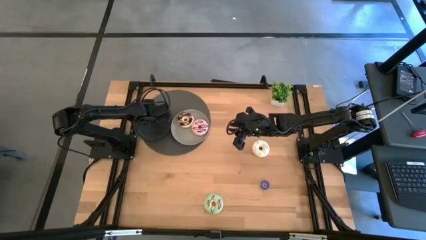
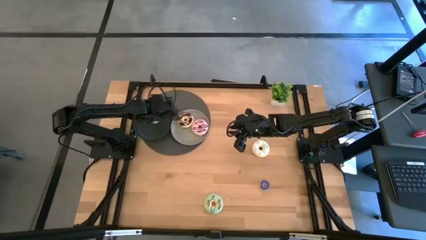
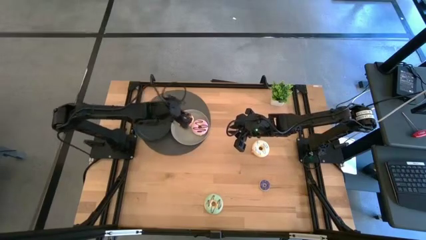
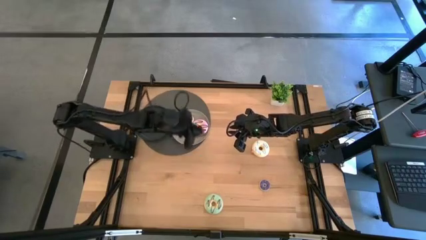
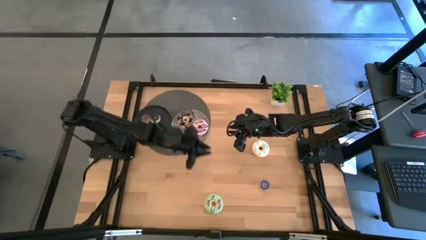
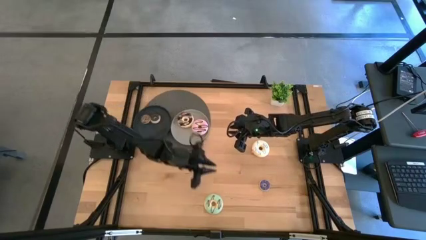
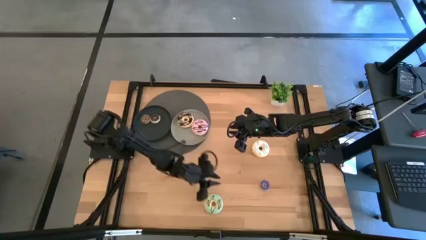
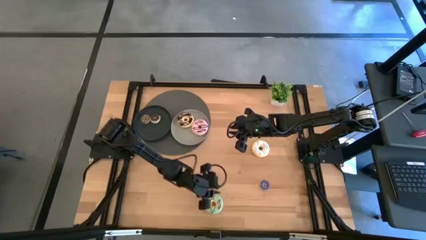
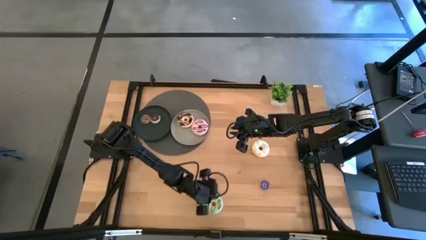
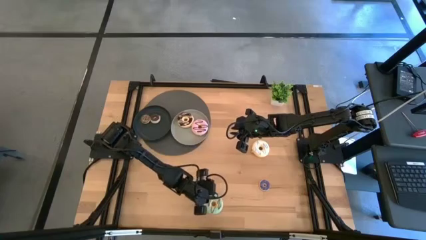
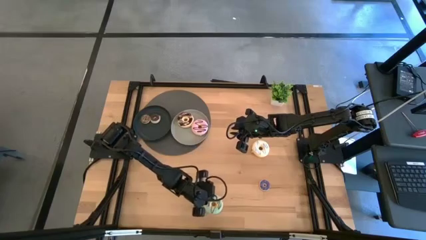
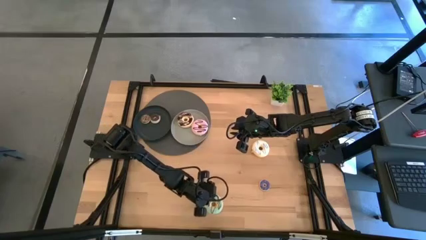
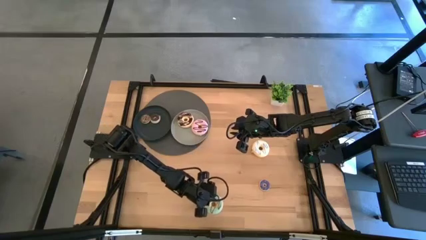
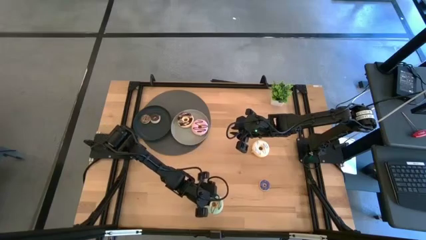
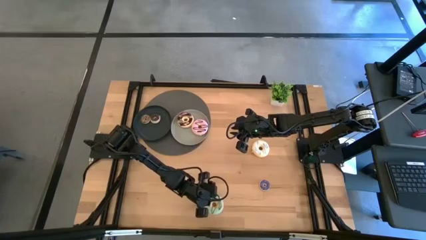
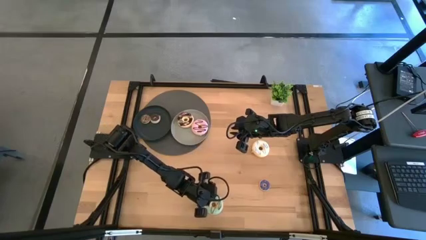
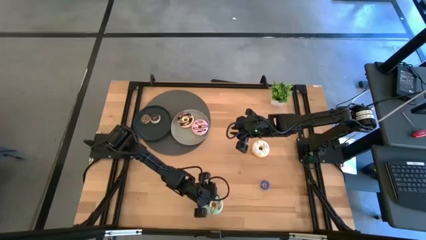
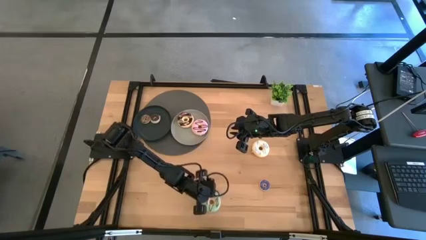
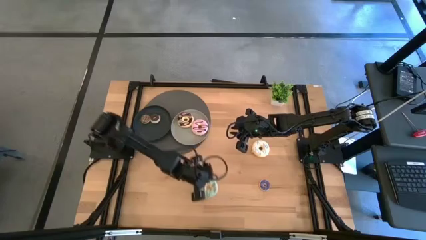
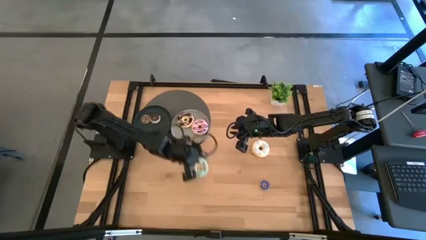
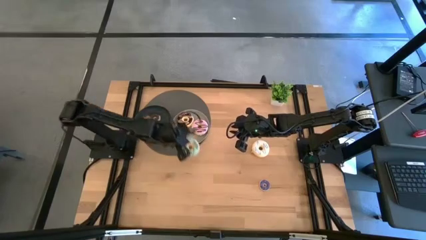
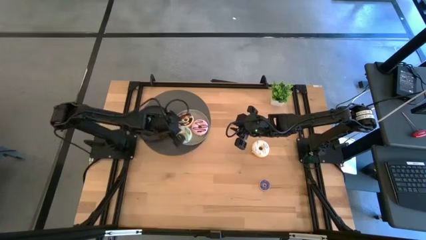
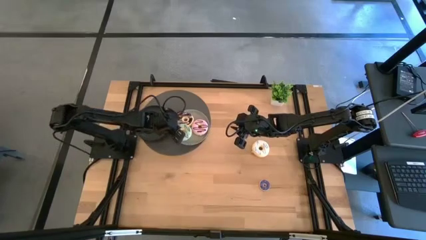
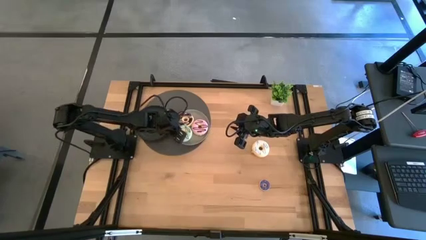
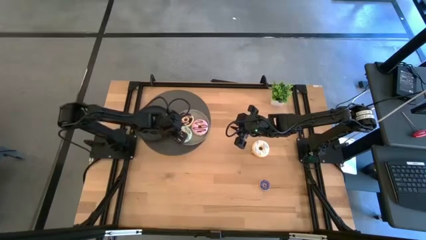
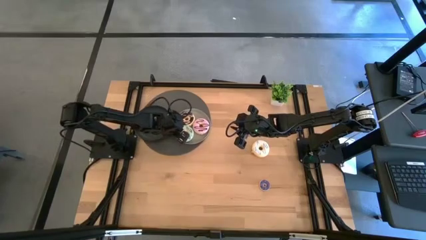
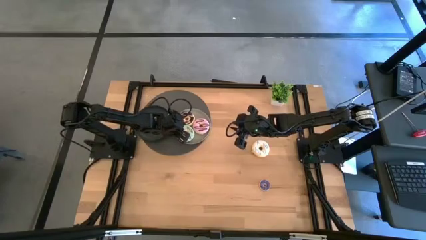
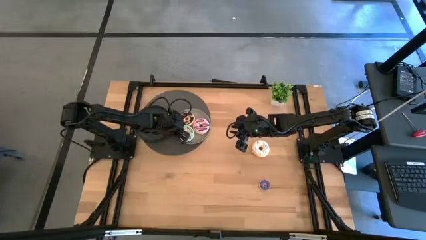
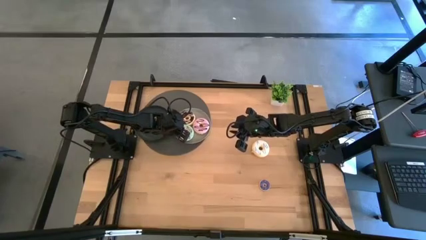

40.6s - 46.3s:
Task: Pick & Place donuts
Put the big blue donut on the gray plate

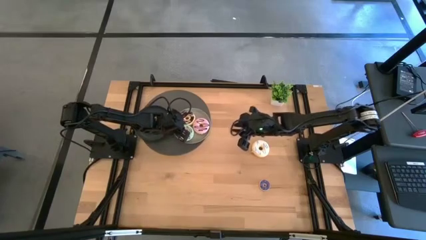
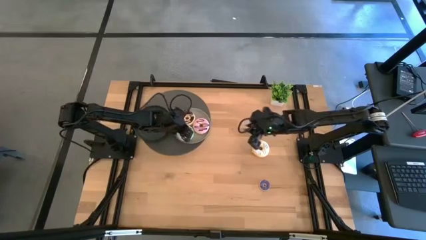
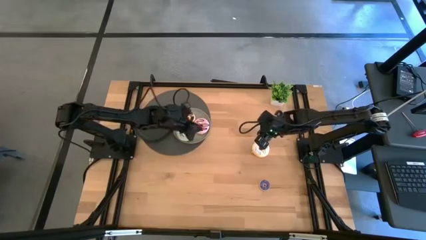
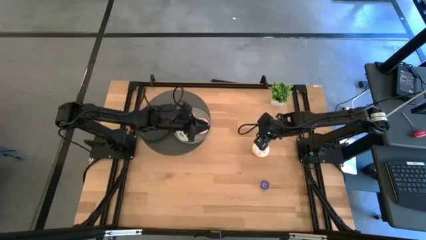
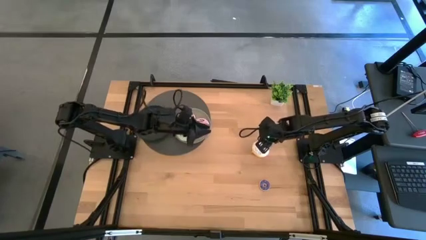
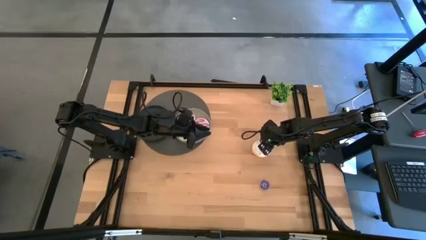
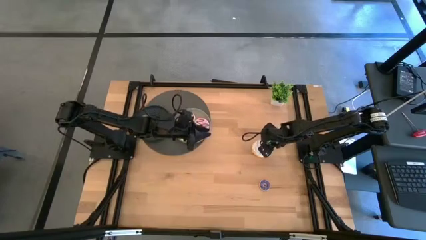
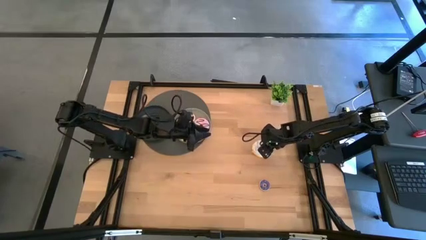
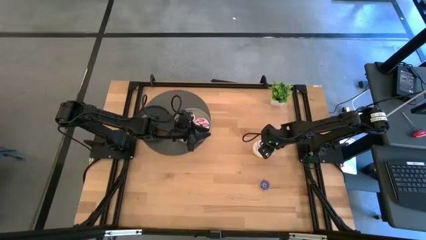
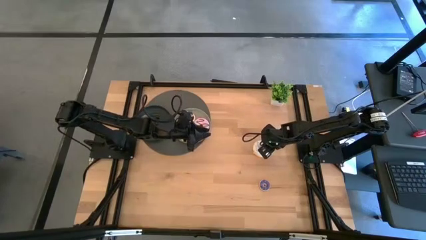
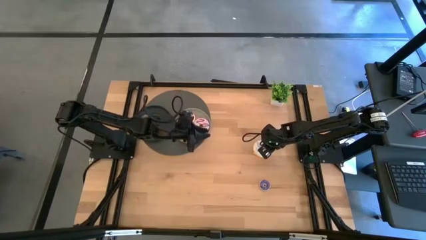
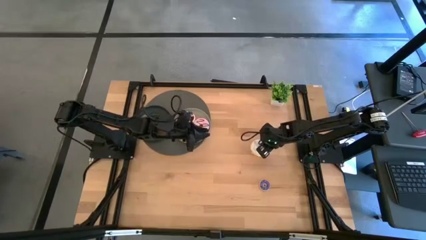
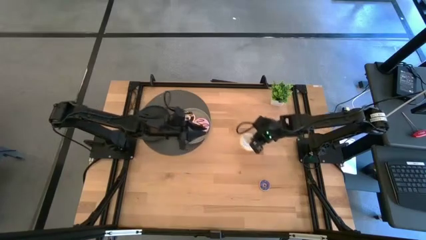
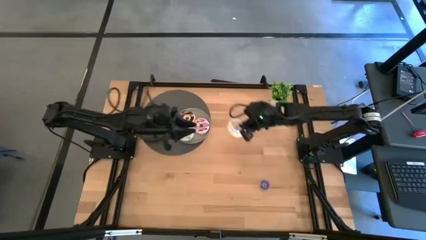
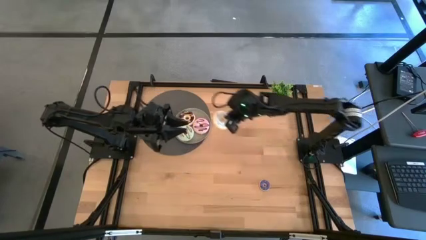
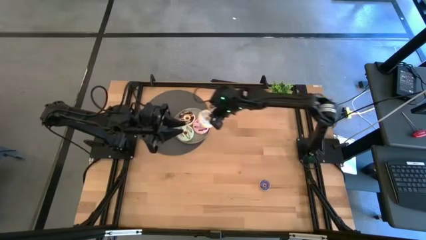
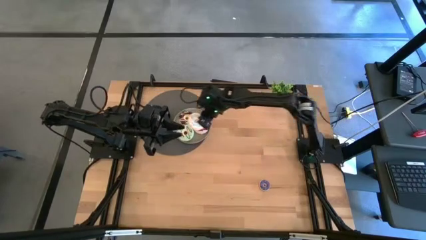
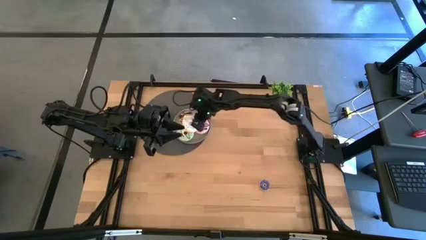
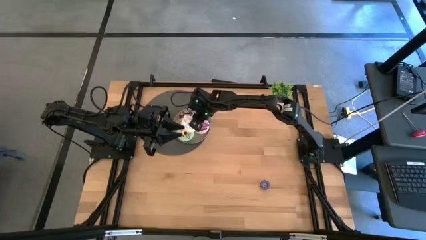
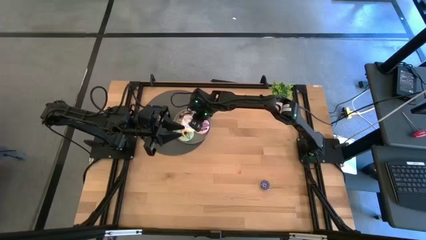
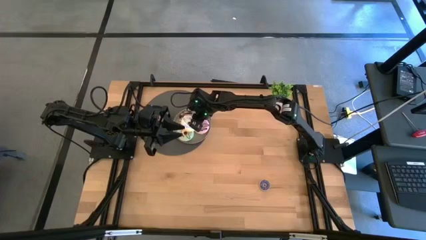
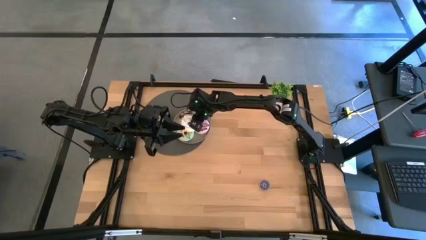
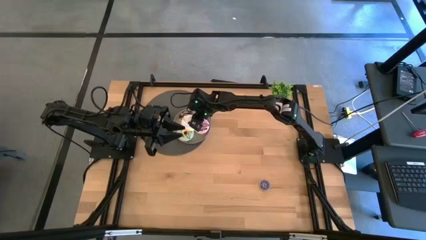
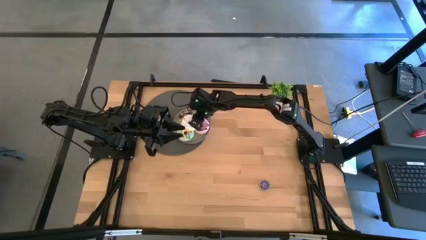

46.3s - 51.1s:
Put the big white donut on the gray plate

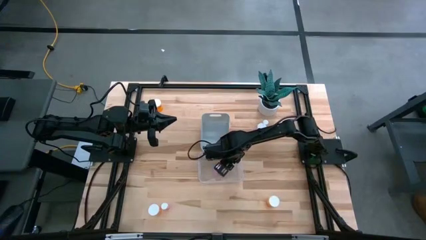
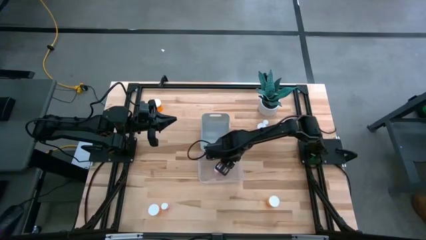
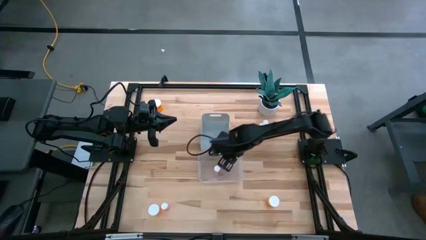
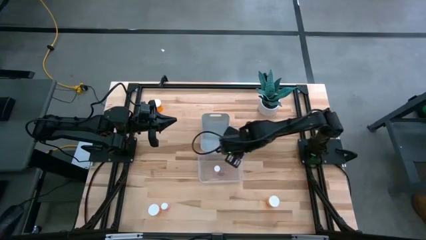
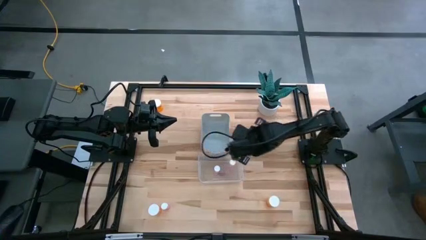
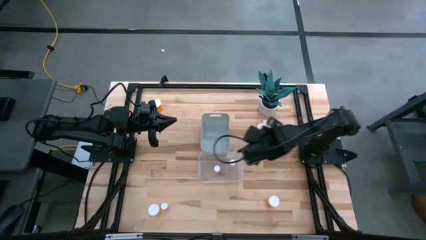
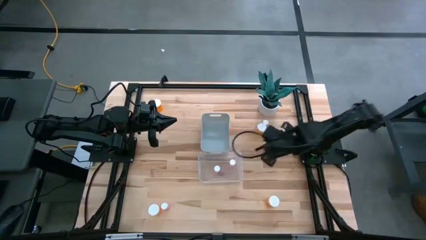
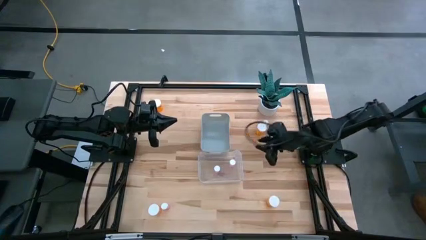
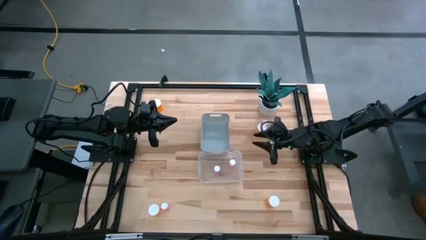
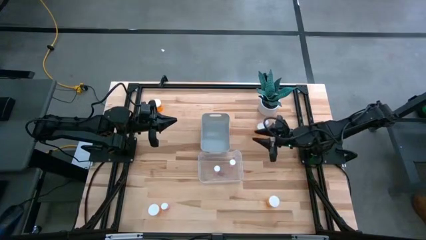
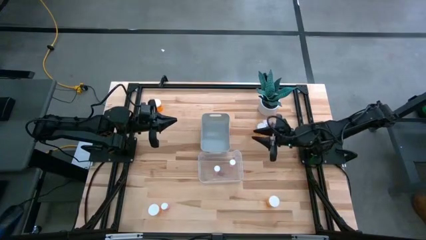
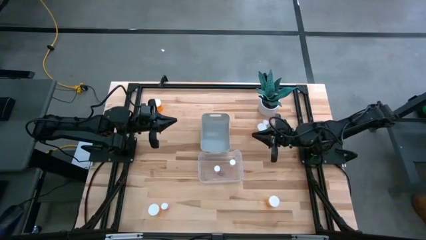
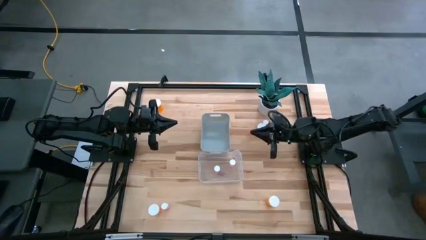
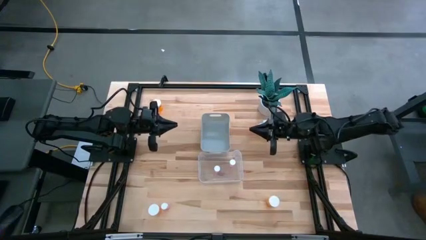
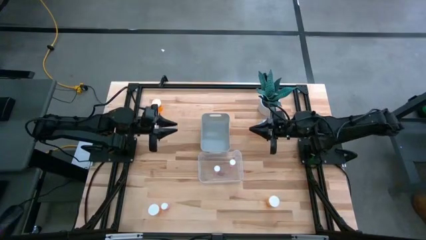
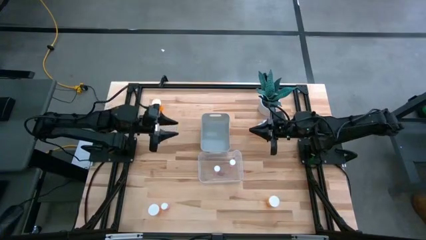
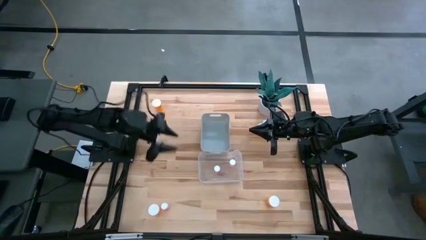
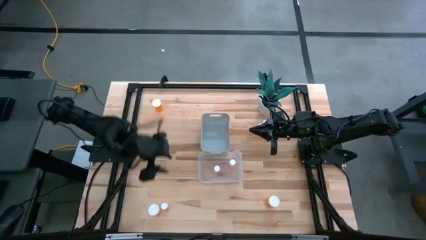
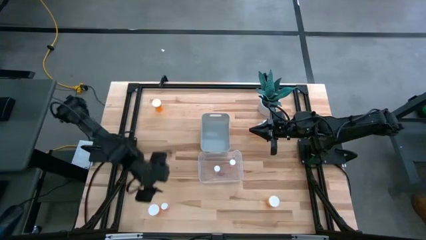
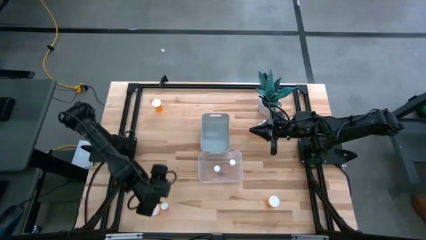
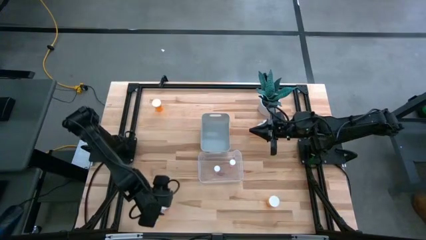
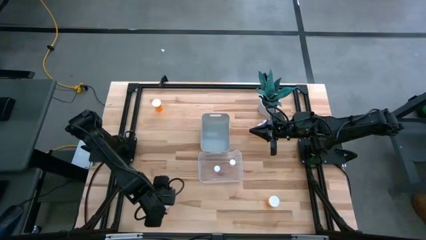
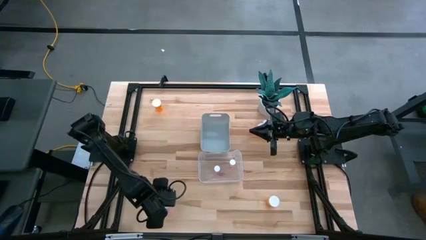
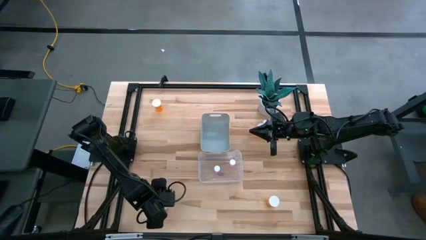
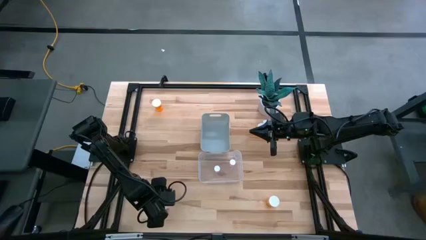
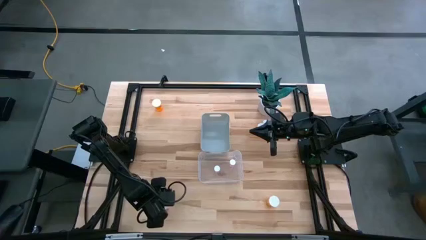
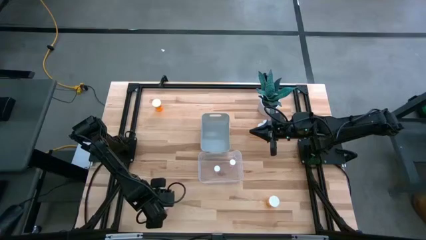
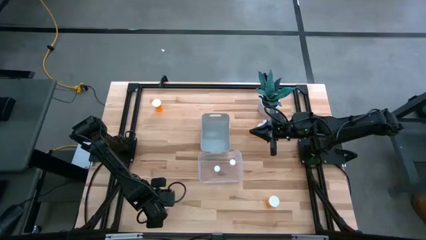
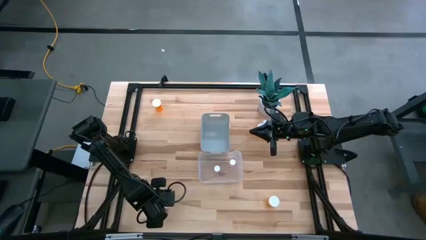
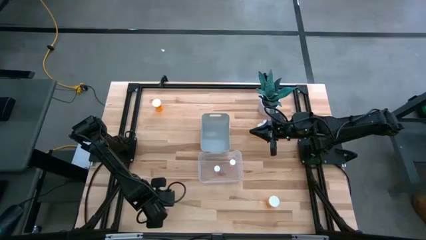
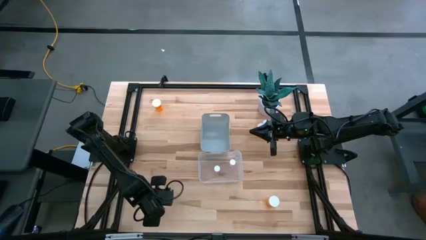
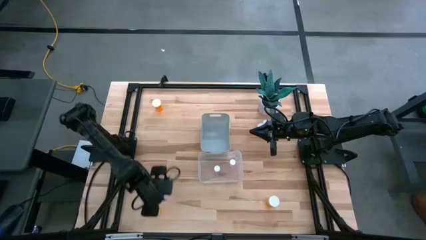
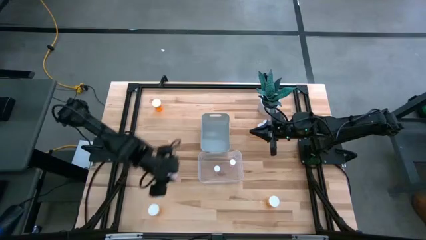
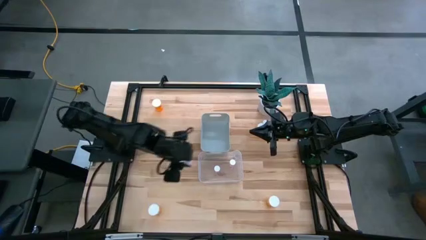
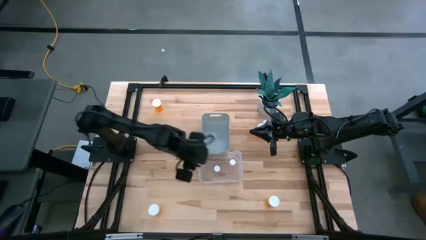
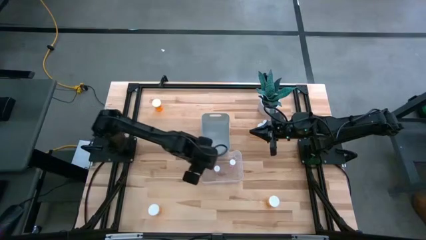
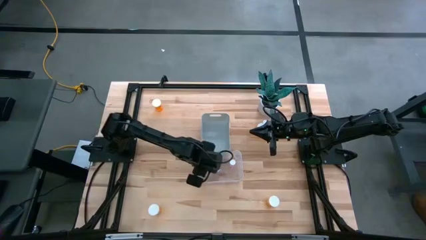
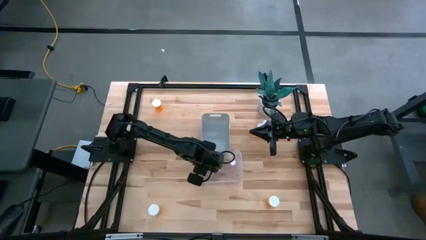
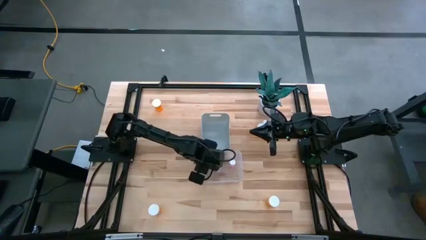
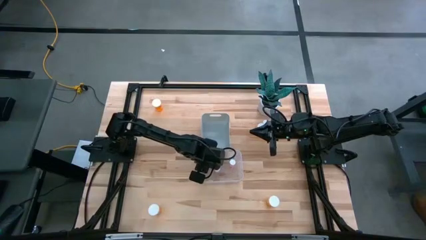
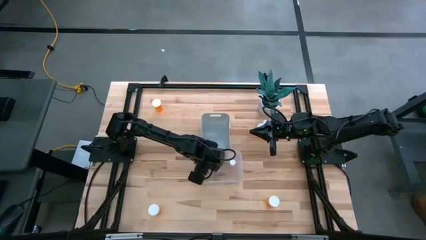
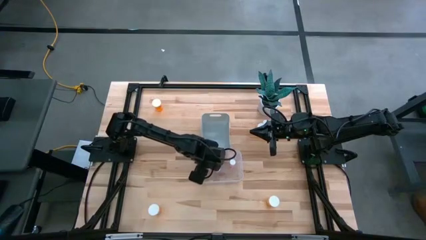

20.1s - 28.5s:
Task: Pick and place medicine bottles into bin by pill shape (circle, oval)
Put the bottom pink pill bottle into the transparent bin
